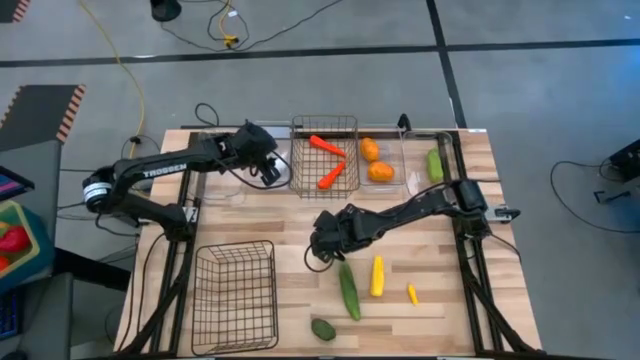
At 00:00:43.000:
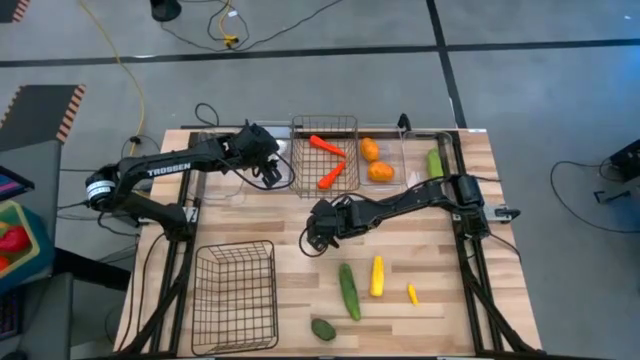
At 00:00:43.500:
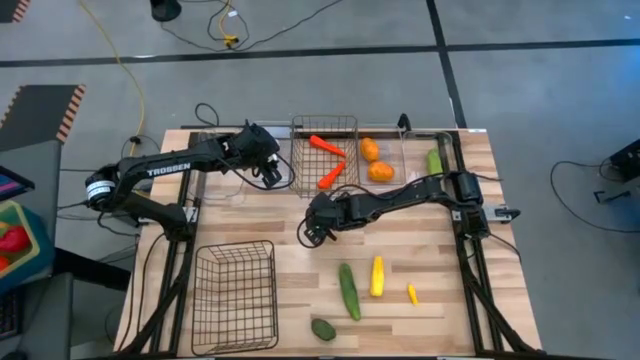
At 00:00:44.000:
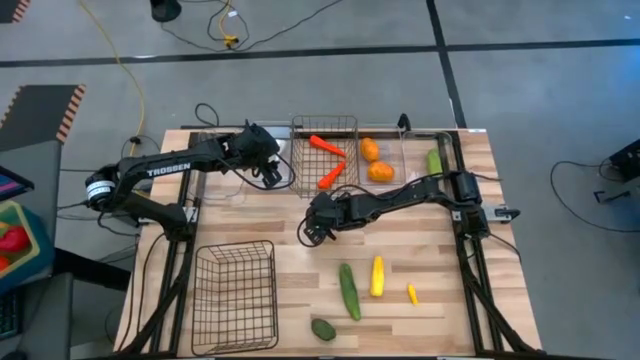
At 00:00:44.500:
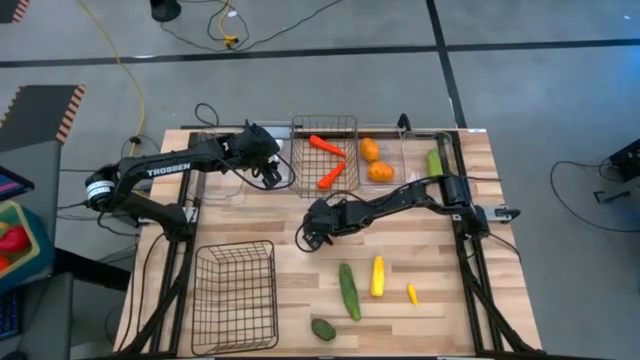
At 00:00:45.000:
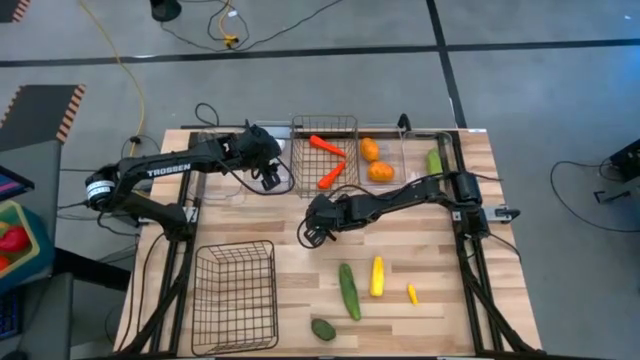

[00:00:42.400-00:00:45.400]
Task: Sort produce into baskets
Put the white garlic into the middle left transparent bin

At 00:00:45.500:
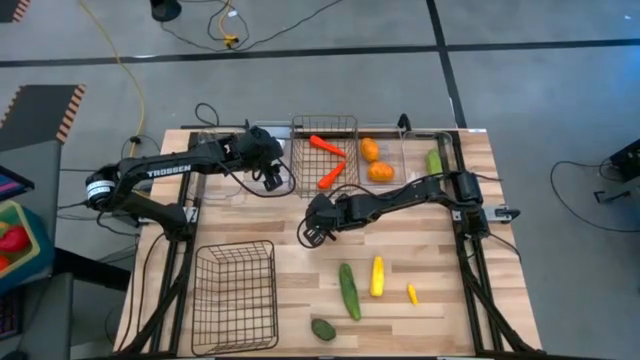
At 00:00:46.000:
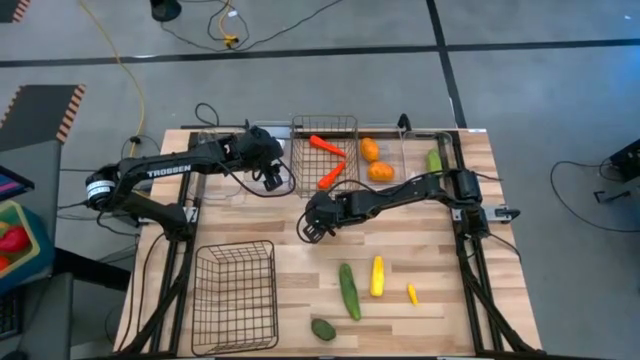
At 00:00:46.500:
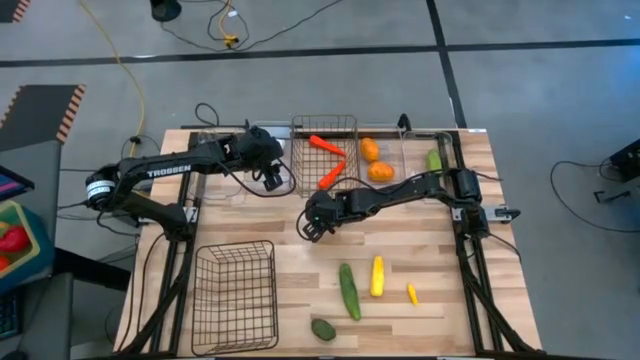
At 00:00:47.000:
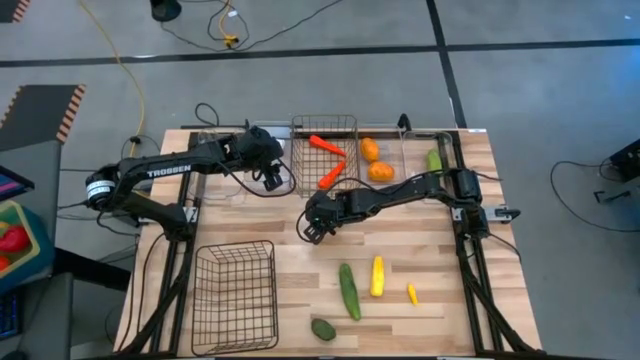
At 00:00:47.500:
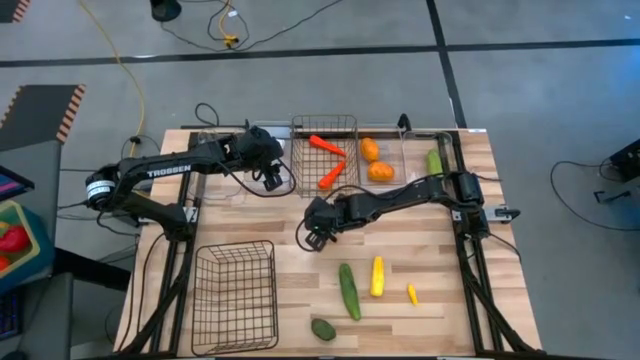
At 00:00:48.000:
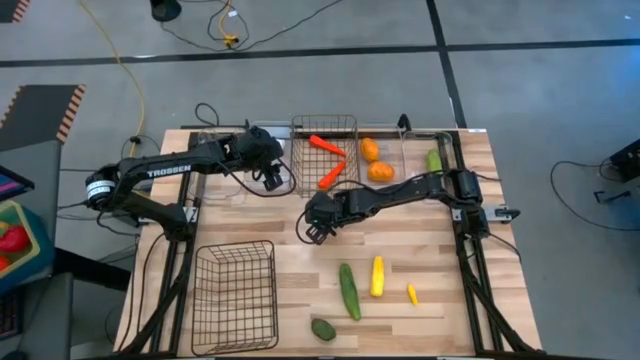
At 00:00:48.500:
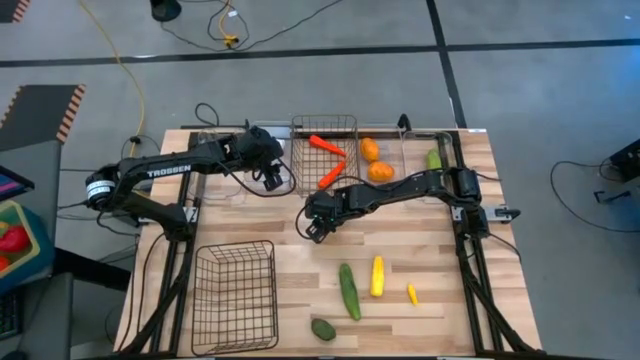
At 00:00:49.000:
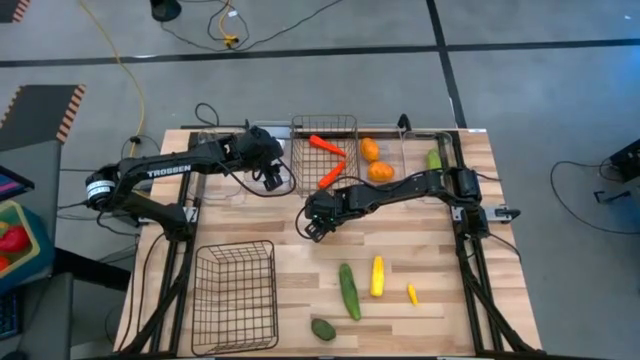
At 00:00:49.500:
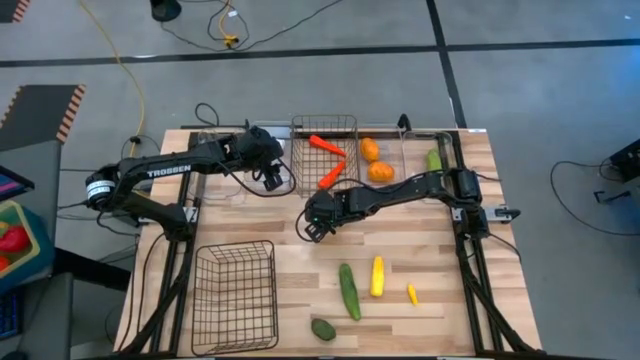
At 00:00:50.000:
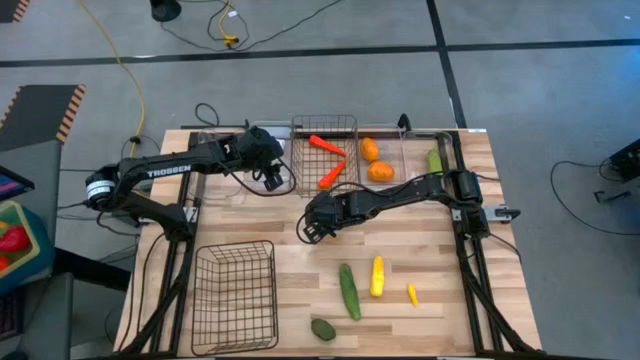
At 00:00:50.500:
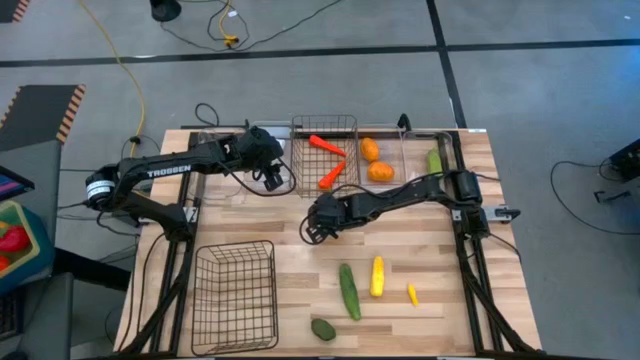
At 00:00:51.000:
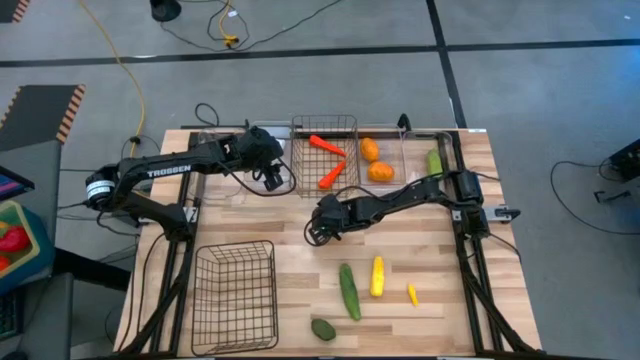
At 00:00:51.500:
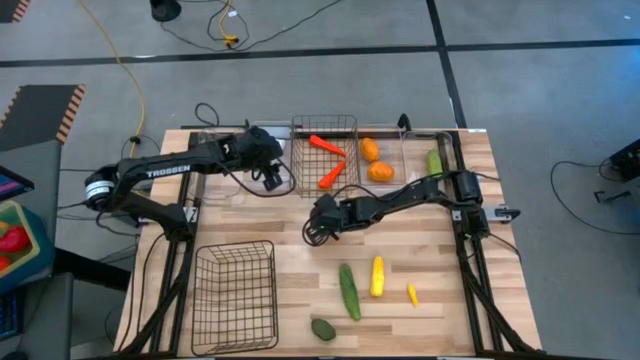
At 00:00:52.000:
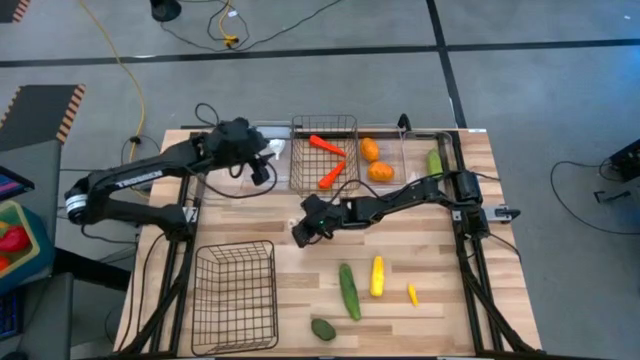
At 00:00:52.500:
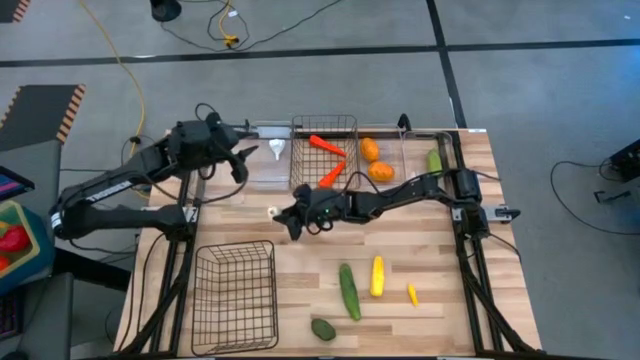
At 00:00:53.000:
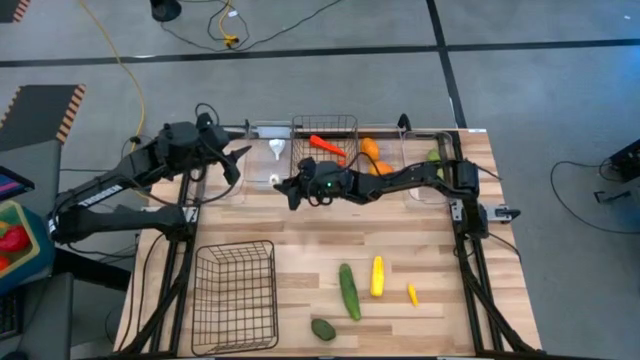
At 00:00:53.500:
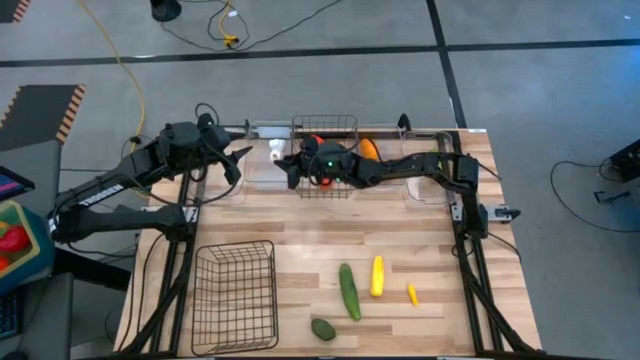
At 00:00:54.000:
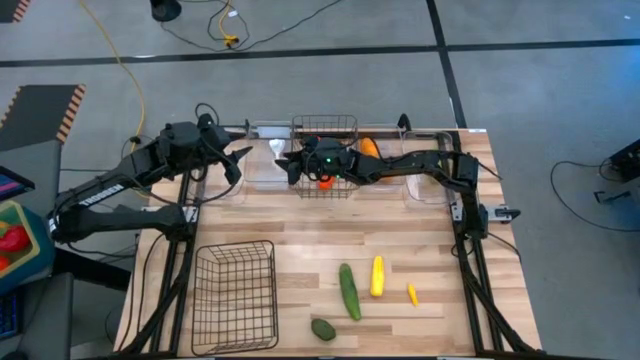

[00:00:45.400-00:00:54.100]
Put the white garlic into the middle left transparent bin

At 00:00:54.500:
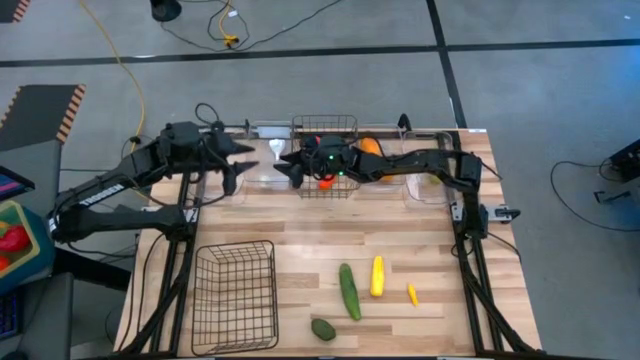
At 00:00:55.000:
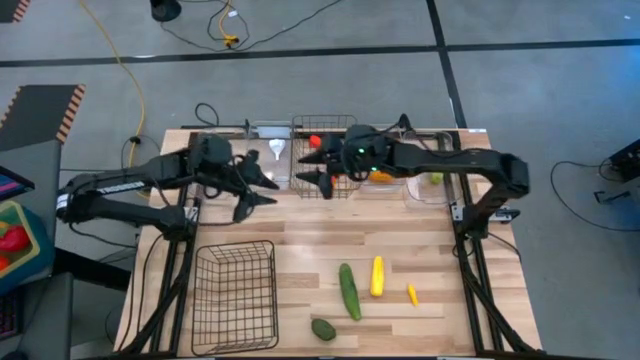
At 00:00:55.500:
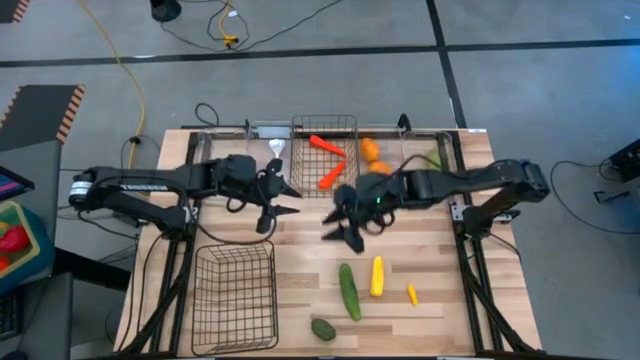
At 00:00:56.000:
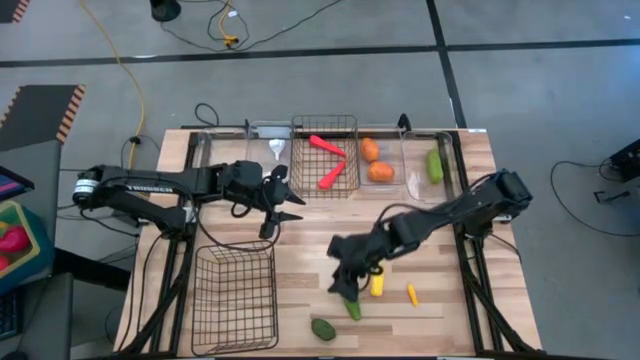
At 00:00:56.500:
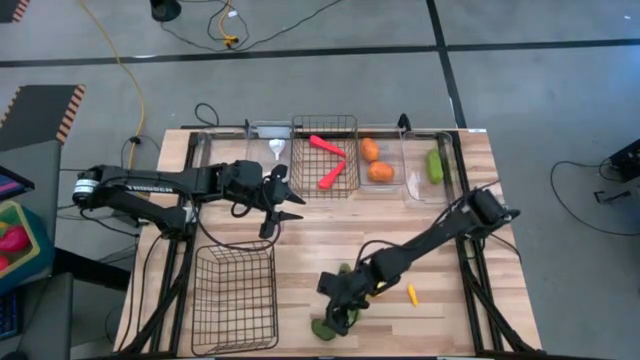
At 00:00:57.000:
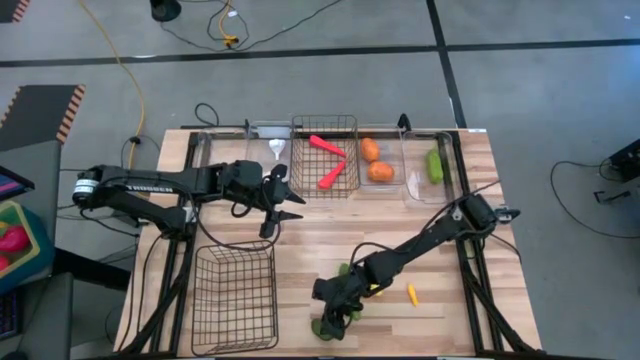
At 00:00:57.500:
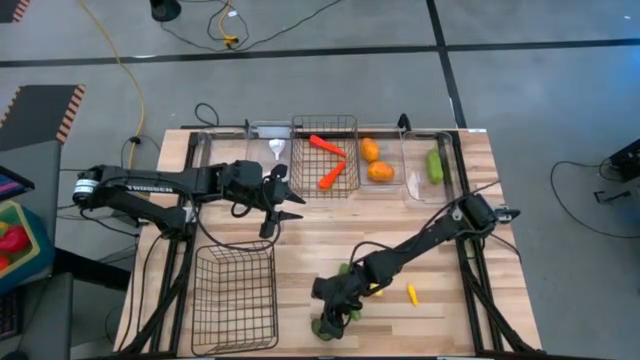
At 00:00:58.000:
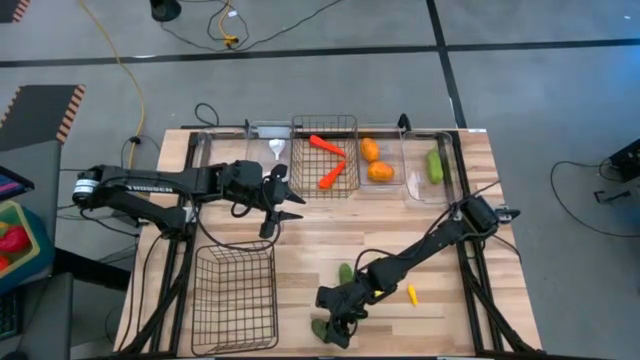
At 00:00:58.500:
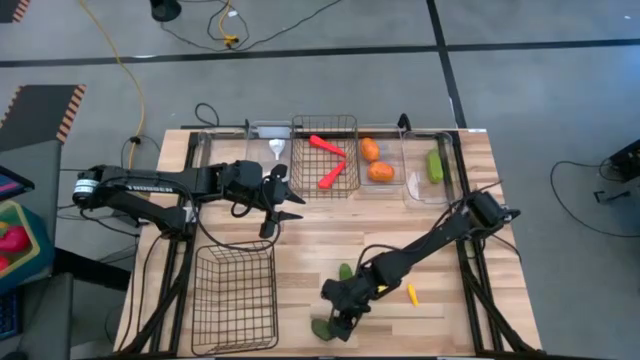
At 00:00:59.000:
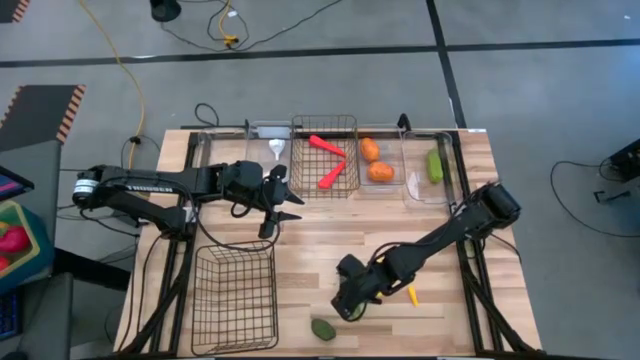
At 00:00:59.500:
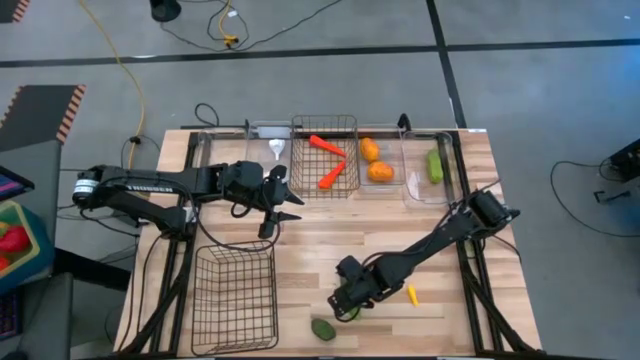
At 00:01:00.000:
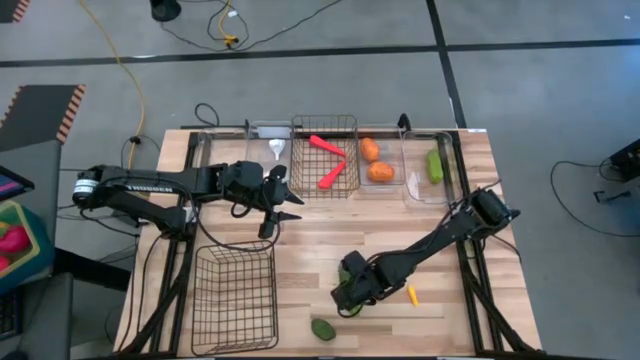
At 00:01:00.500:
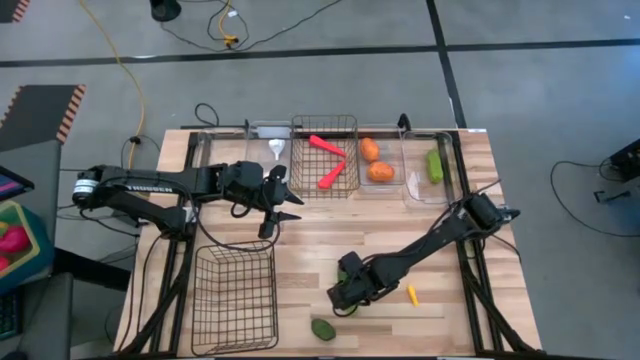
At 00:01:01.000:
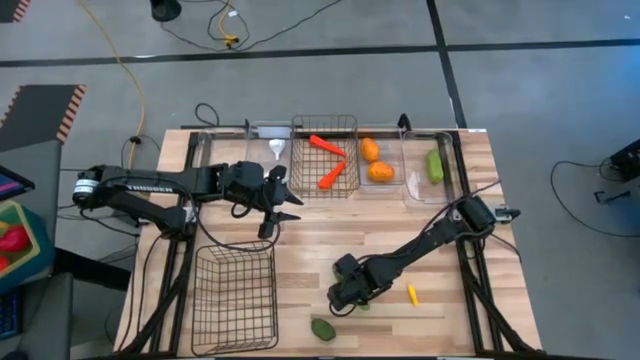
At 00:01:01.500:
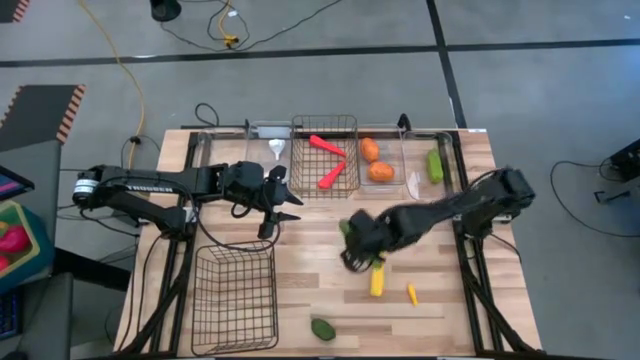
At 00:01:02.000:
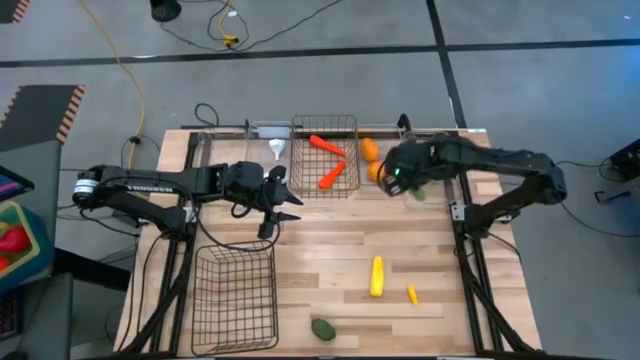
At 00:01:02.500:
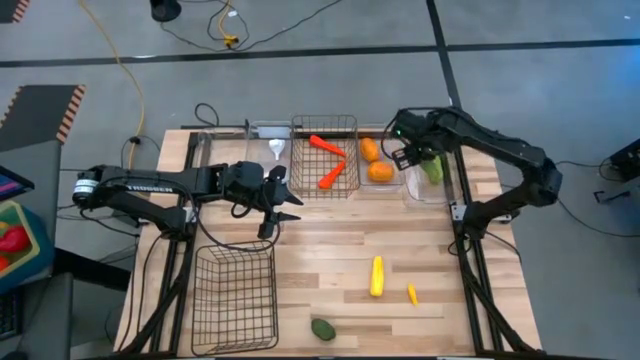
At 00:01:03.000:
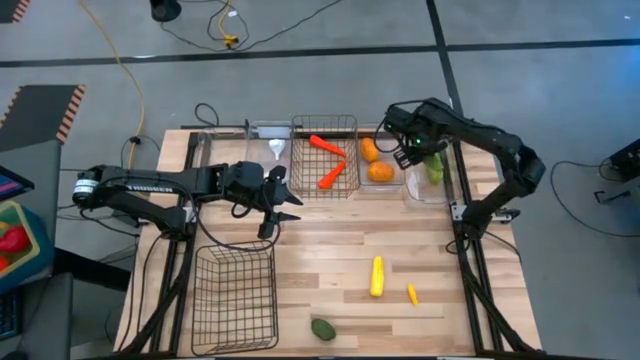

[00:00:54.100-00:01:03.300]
Put the green cucumber into the right transparent bin
